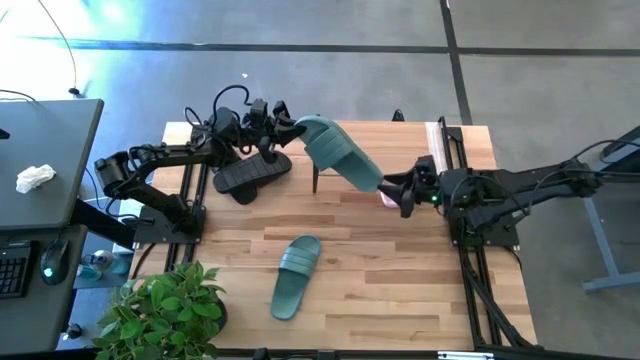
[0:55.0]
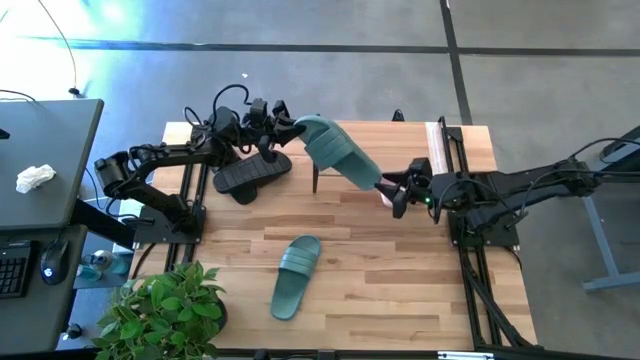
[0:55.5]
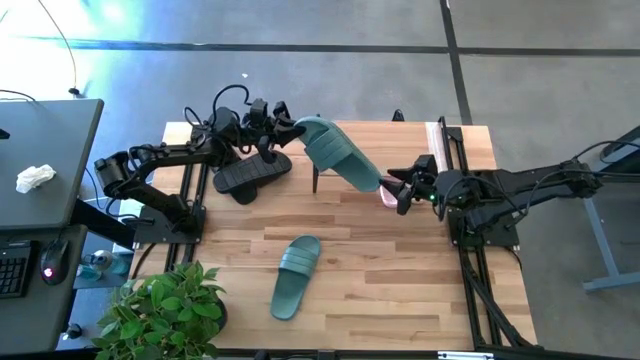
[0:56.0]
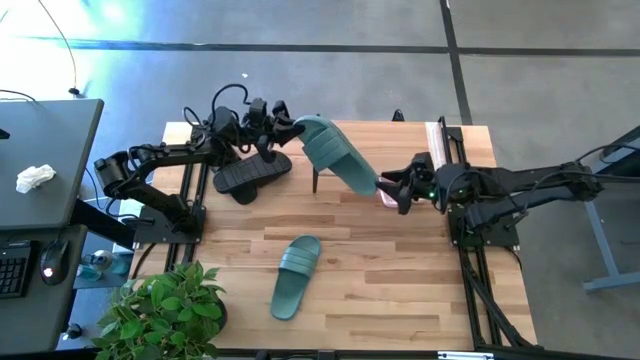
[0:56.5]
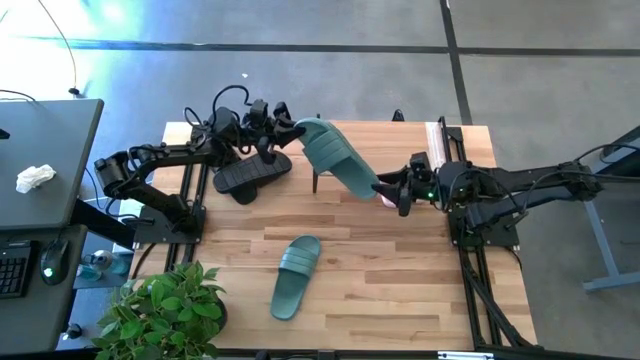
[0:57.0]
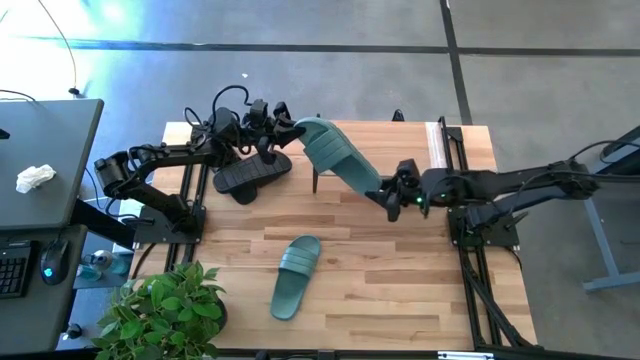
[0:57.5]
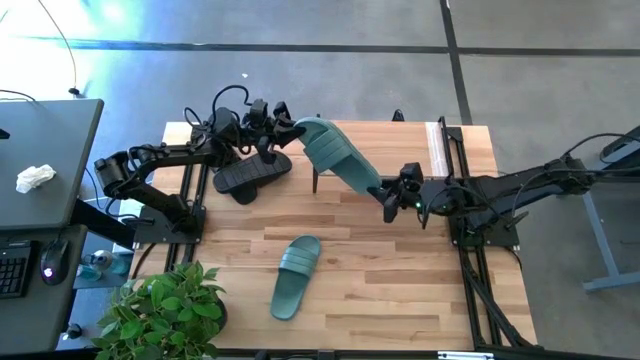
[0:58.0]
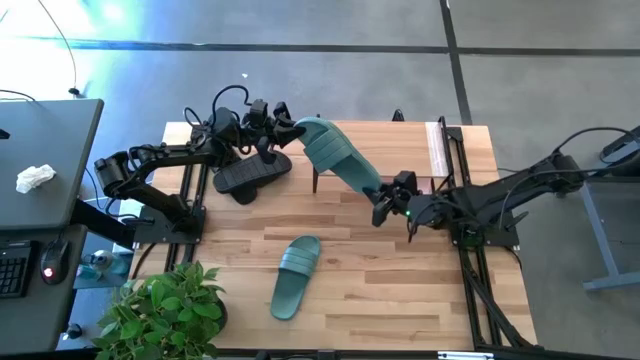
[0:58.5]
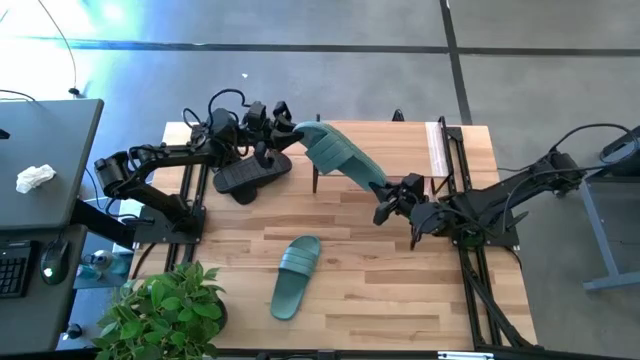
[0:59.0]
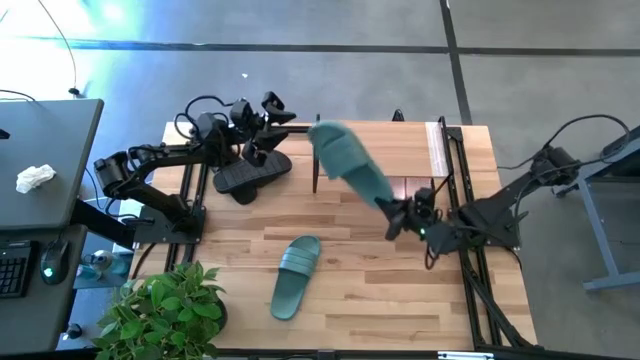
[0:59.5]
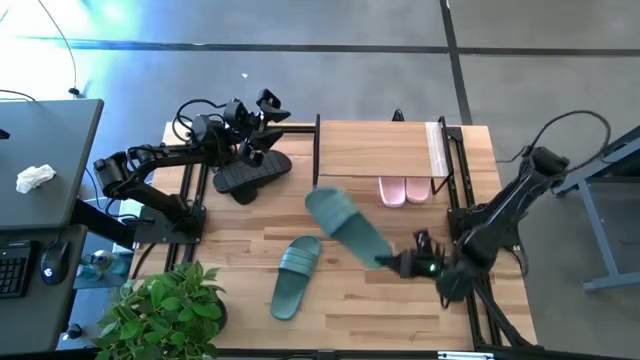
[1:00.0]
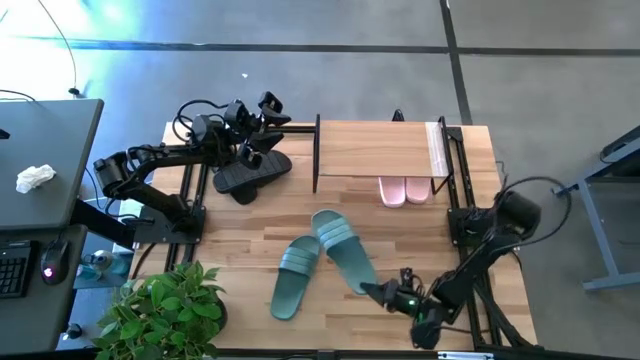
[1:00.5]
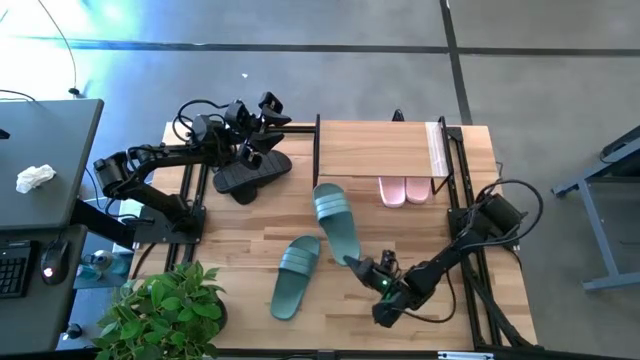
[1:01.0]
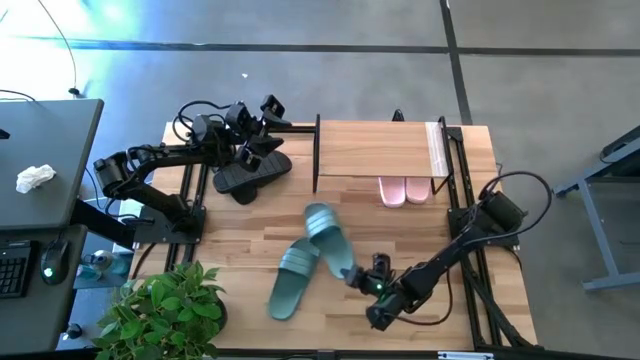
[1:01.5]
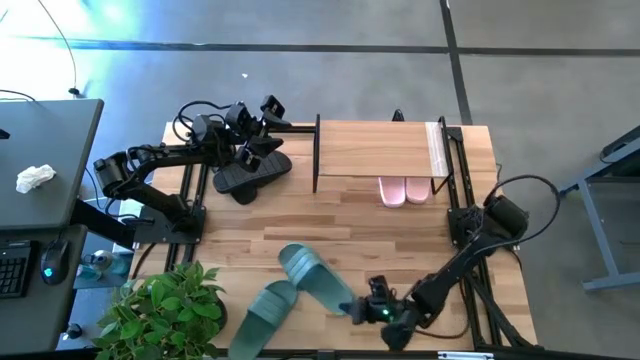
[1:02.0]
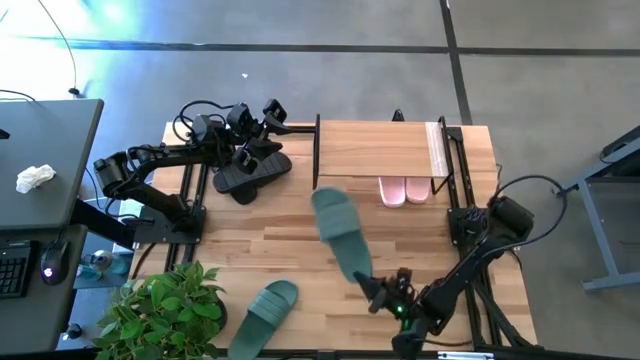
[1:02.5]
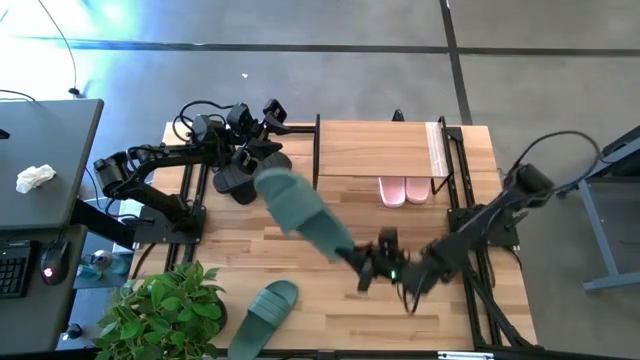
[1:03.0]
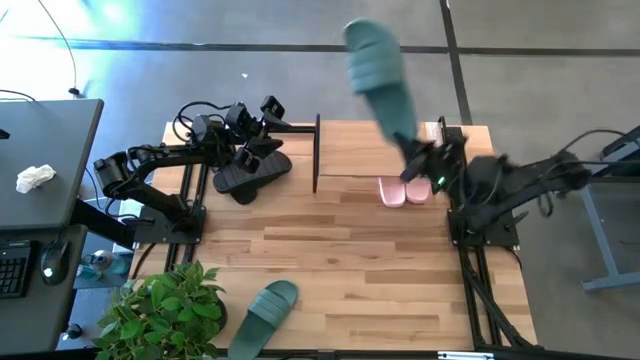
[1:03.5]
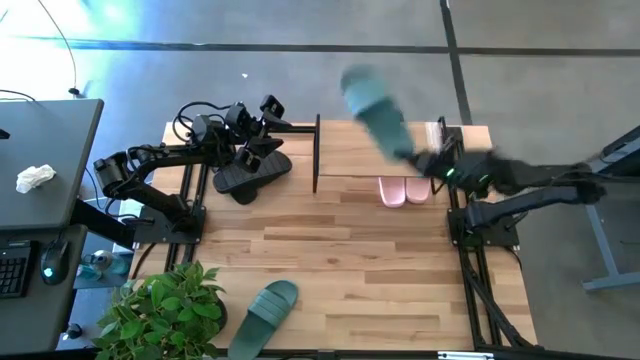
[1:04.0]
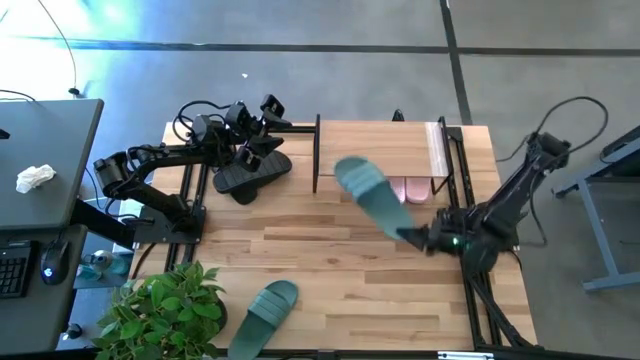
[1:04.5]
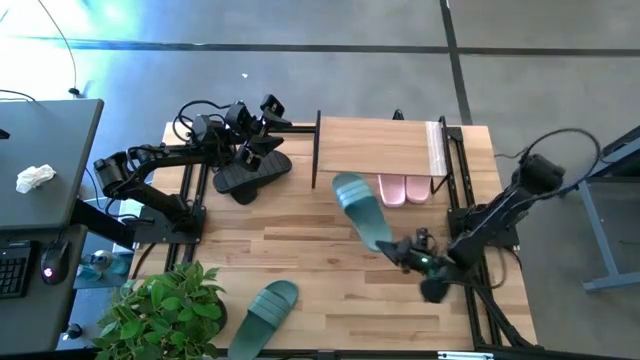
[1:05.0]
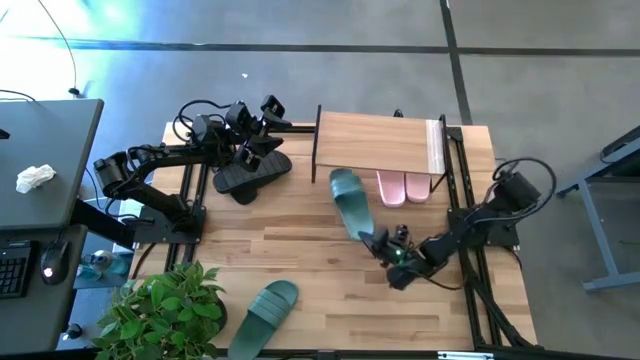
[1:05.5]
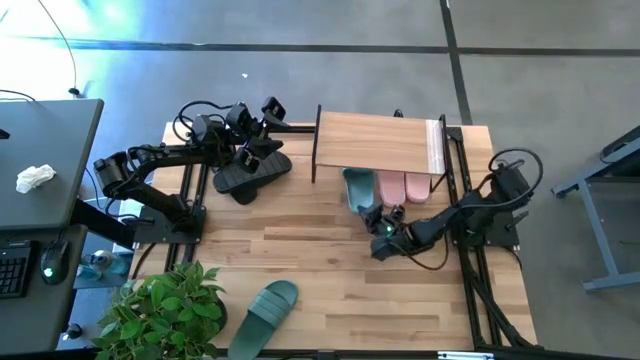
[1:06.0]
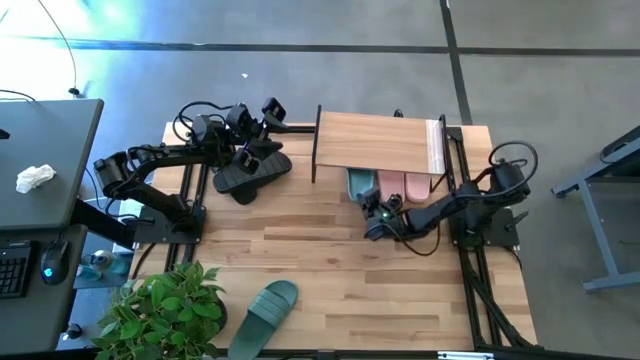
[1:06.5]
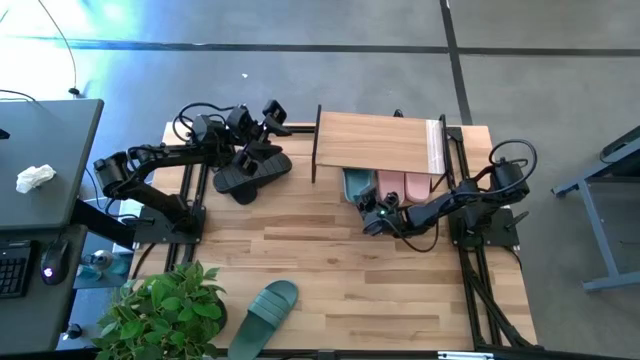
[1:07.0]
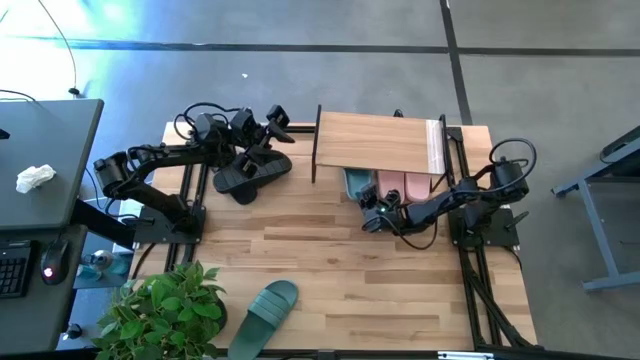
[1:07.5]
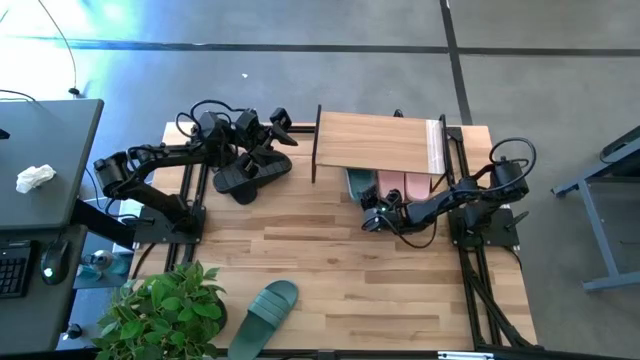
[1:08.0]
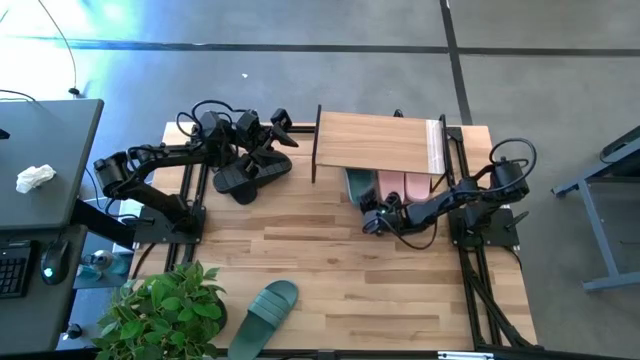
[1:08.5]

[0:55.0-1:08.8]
Task: Pick and place slides into the shelf
Put the right green slide under the shelf

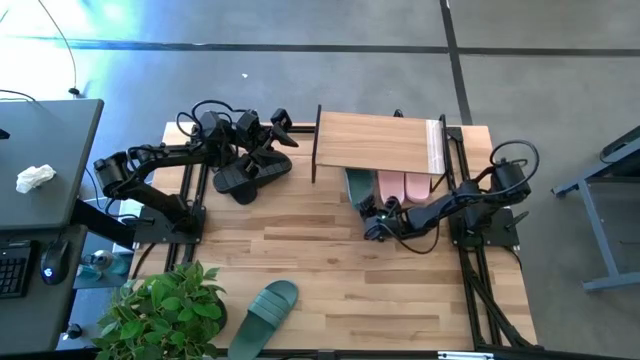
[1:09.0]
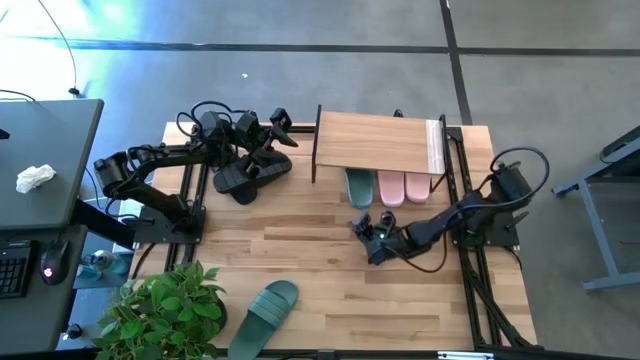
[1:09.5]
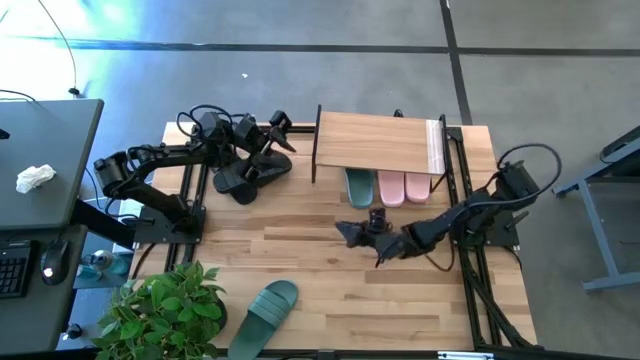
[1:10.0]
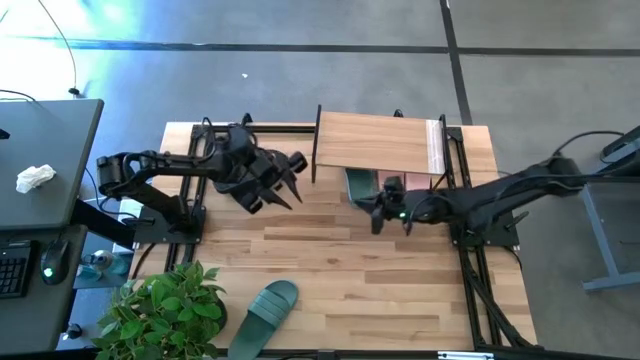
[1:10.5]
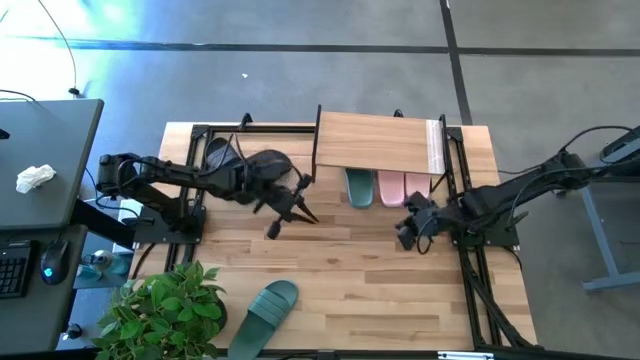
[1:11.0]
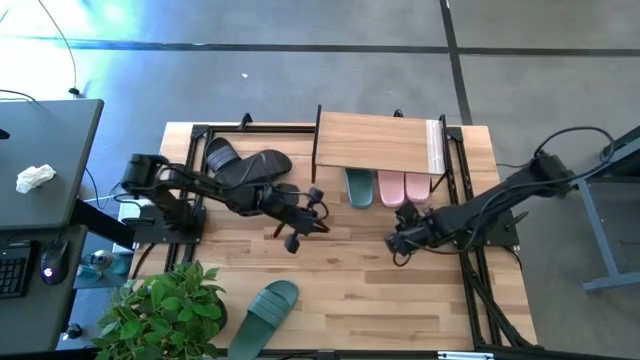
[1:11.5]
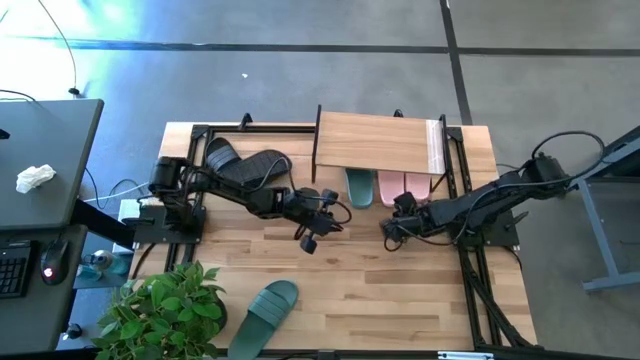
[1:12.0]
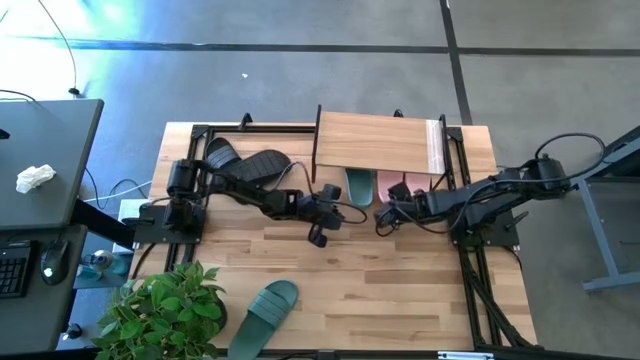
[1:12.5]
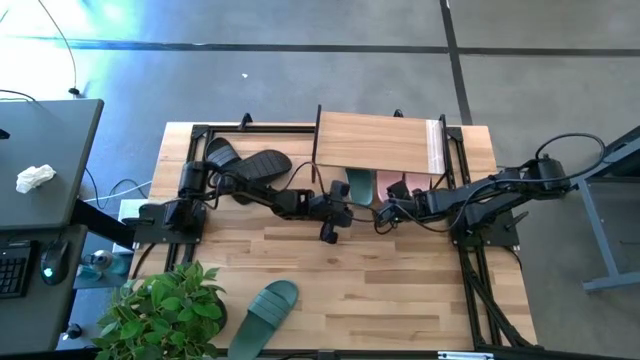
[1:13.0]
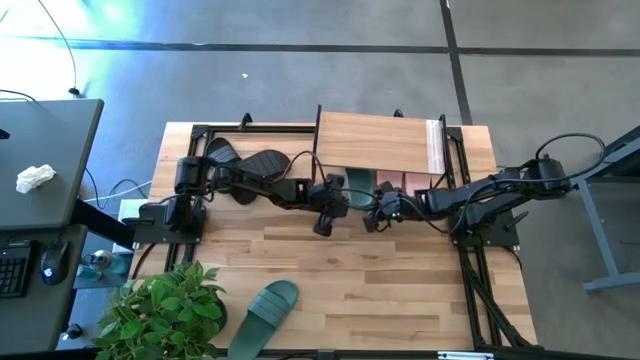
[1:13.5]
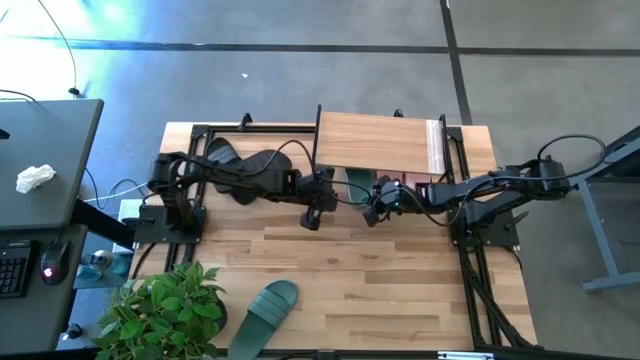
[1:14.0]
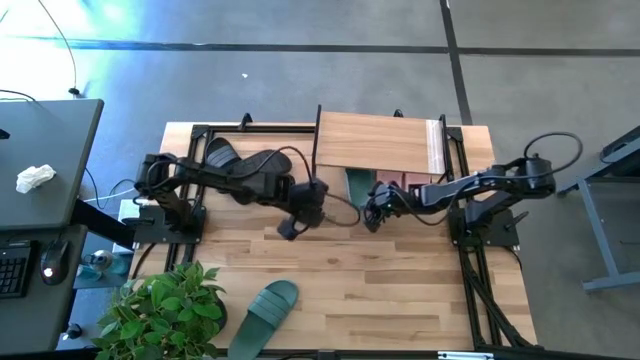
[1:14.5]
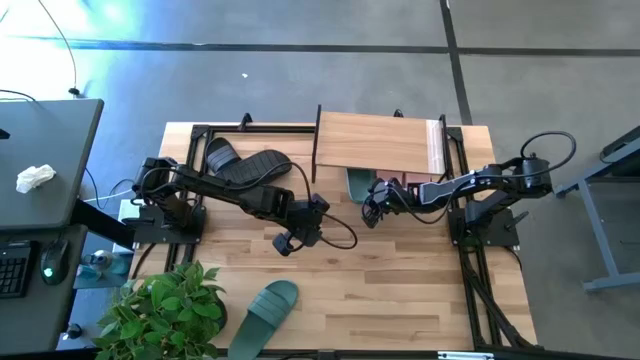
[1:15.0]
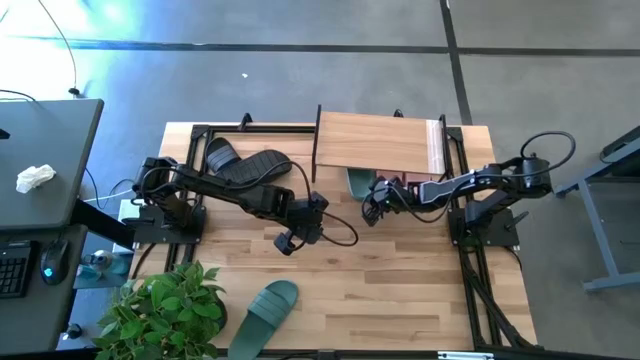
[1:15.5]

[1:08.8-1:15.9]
Adjust the slides under the shelf
